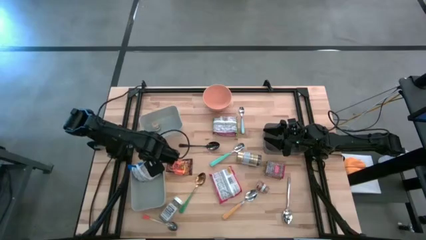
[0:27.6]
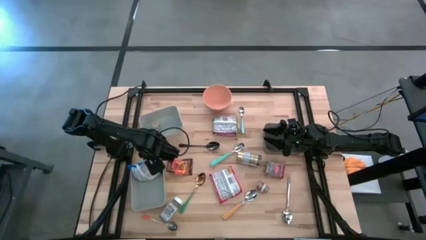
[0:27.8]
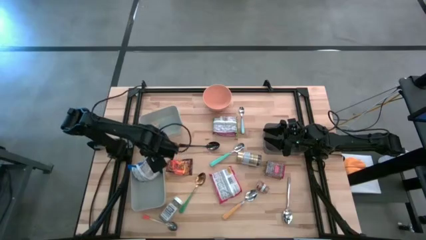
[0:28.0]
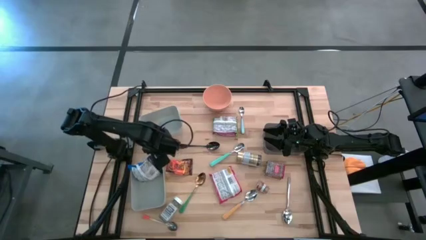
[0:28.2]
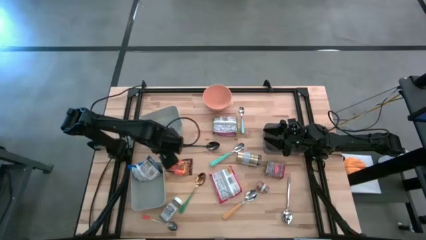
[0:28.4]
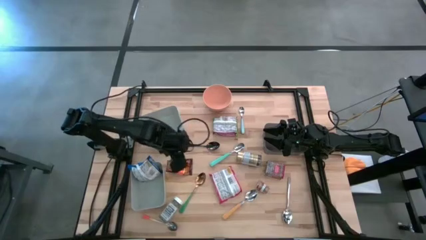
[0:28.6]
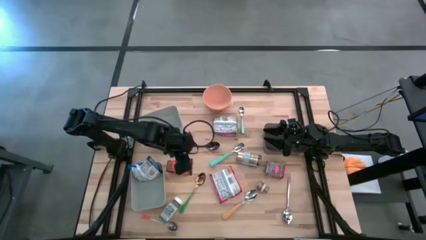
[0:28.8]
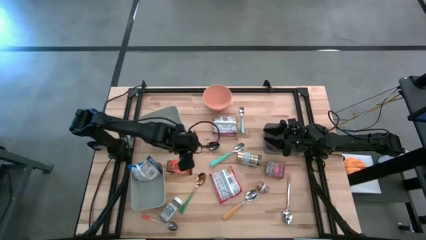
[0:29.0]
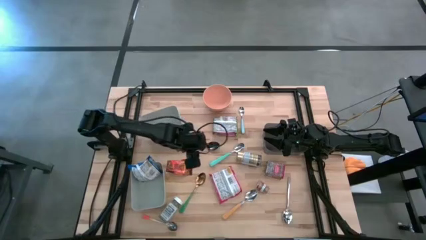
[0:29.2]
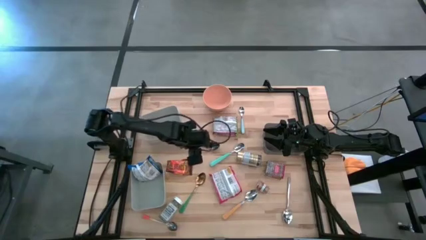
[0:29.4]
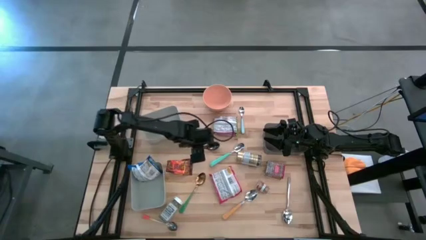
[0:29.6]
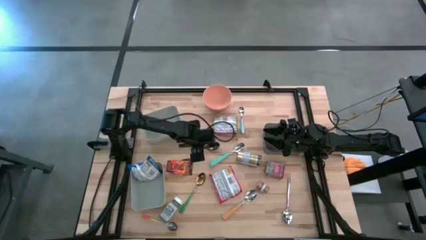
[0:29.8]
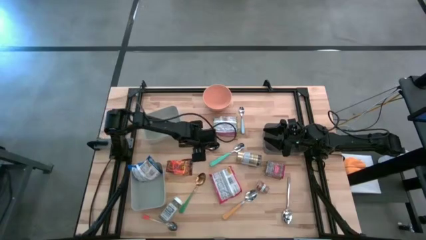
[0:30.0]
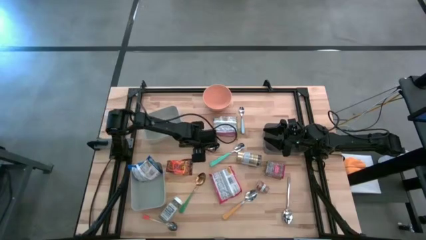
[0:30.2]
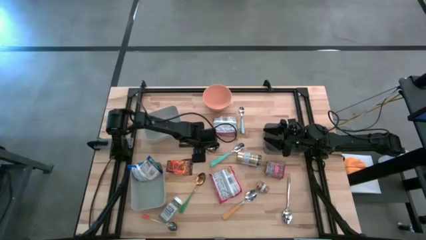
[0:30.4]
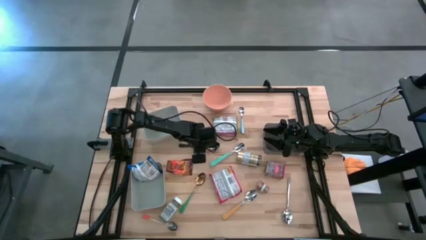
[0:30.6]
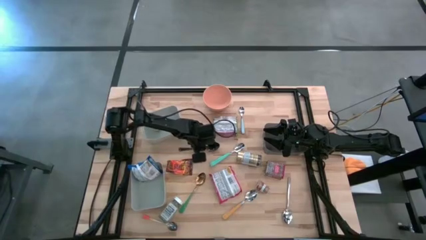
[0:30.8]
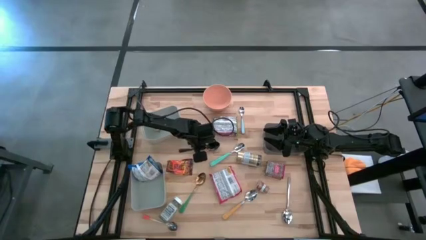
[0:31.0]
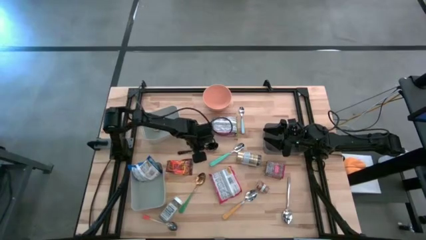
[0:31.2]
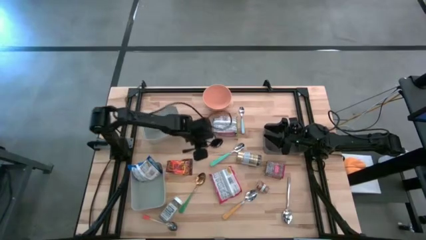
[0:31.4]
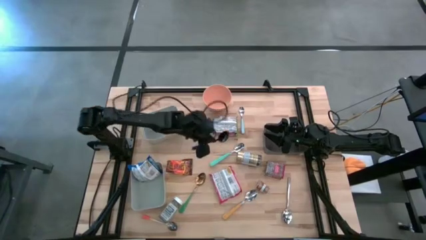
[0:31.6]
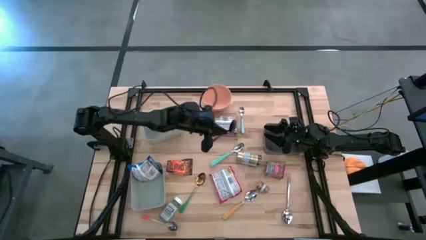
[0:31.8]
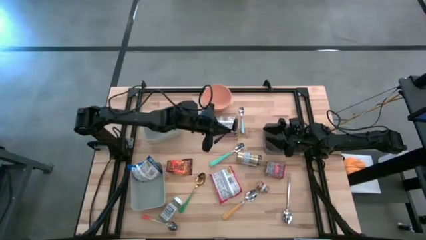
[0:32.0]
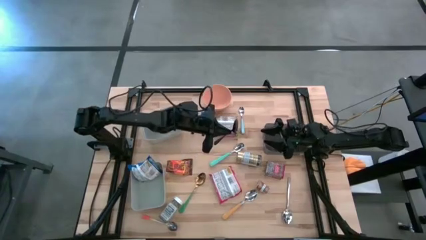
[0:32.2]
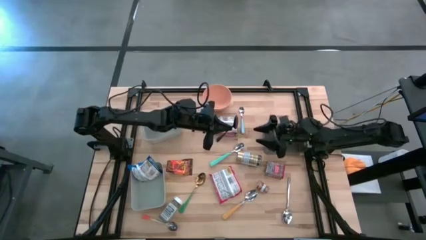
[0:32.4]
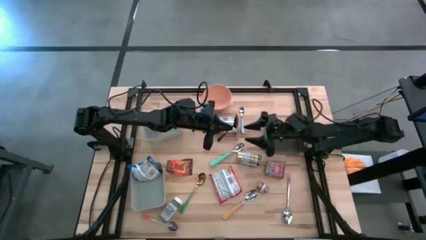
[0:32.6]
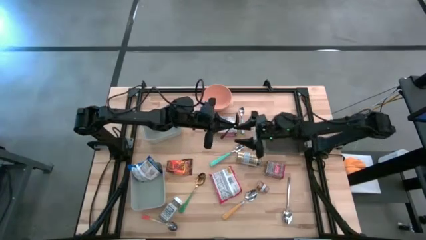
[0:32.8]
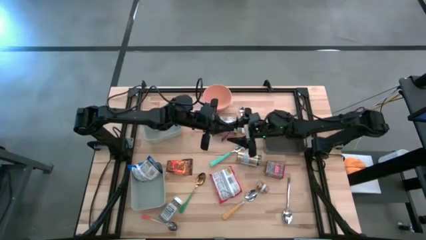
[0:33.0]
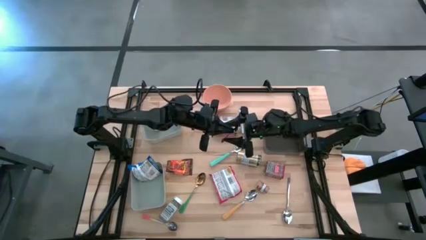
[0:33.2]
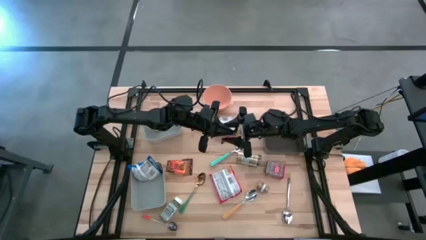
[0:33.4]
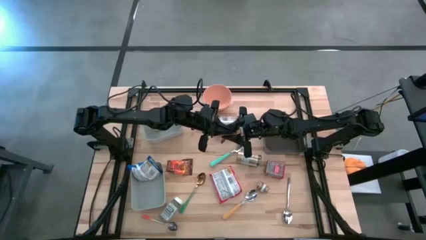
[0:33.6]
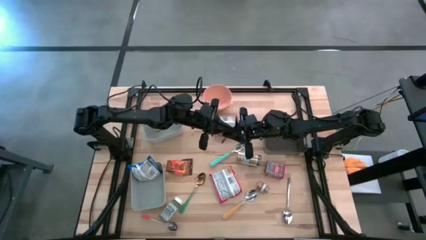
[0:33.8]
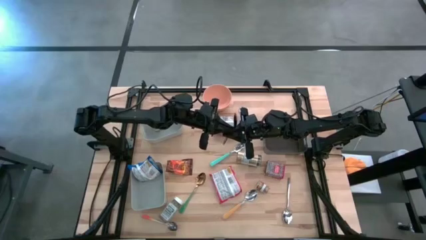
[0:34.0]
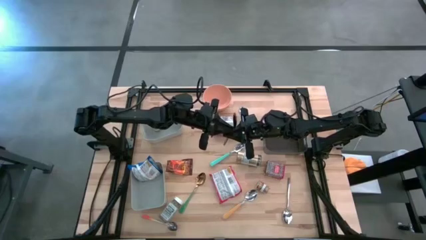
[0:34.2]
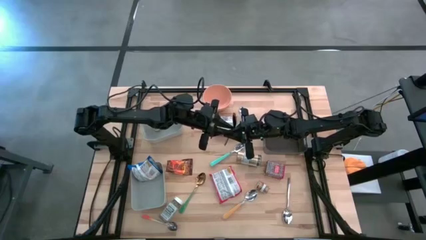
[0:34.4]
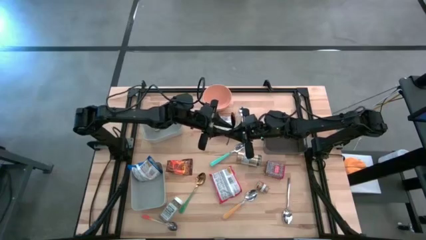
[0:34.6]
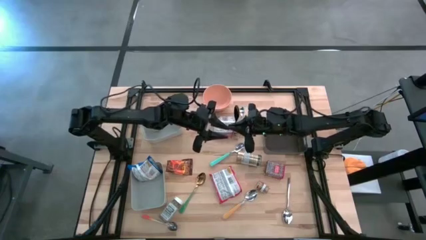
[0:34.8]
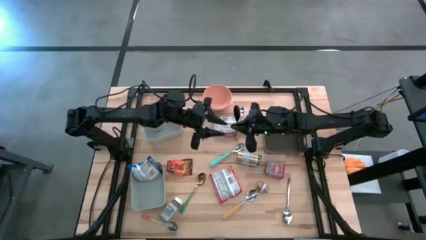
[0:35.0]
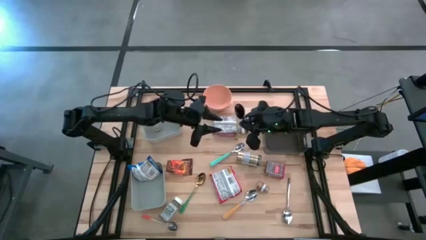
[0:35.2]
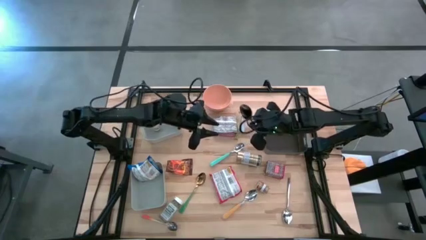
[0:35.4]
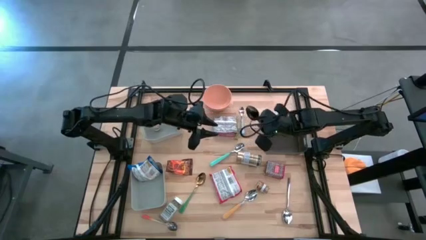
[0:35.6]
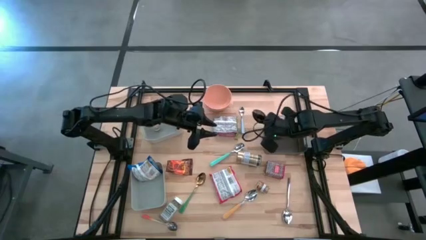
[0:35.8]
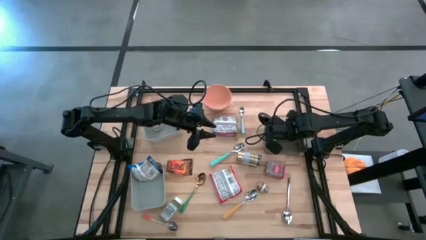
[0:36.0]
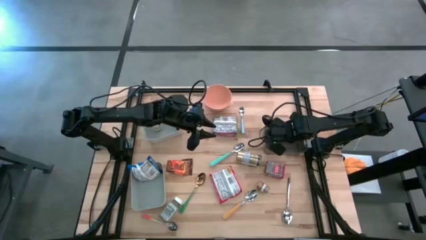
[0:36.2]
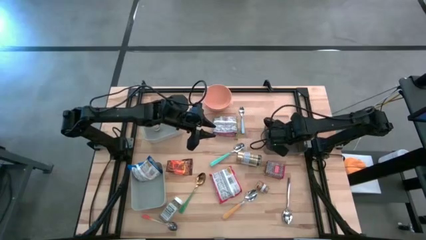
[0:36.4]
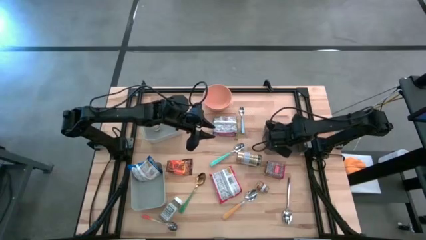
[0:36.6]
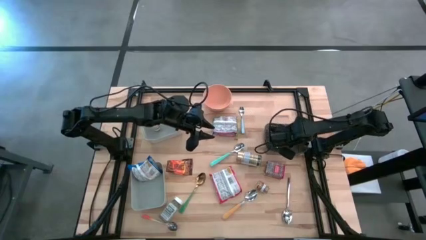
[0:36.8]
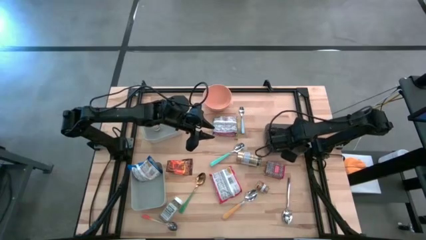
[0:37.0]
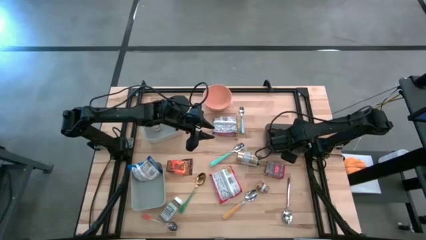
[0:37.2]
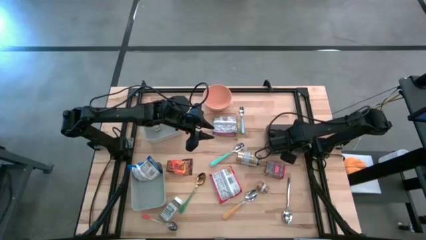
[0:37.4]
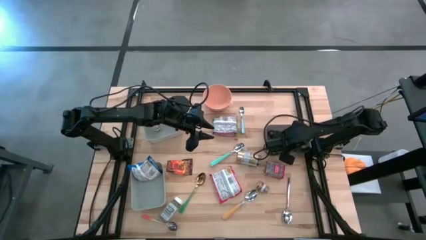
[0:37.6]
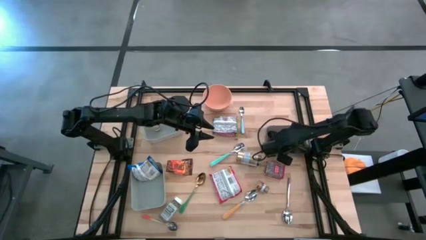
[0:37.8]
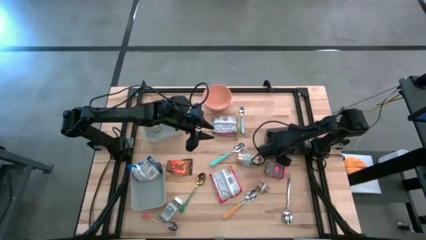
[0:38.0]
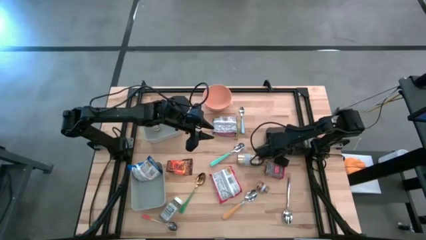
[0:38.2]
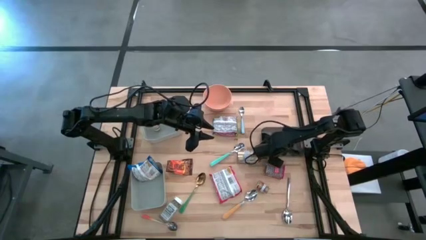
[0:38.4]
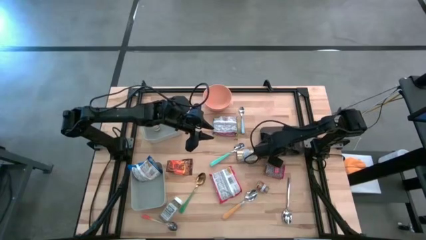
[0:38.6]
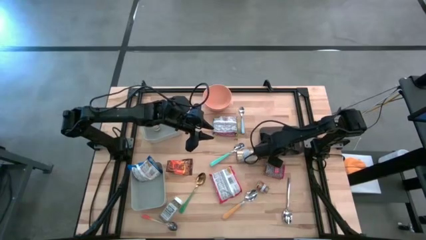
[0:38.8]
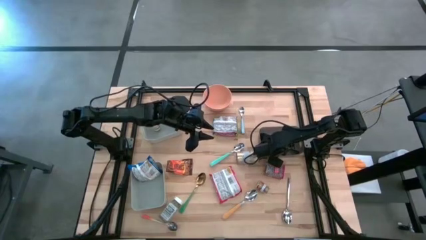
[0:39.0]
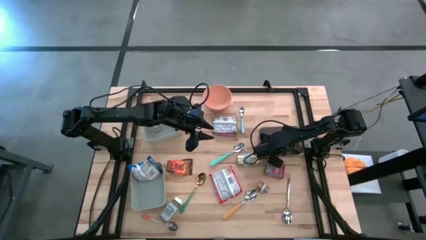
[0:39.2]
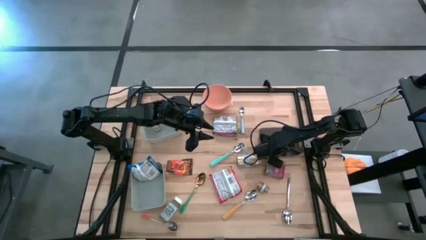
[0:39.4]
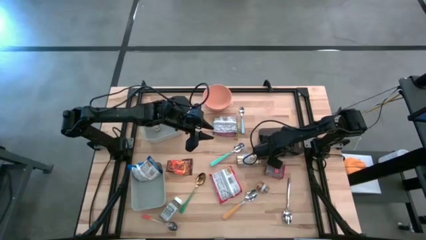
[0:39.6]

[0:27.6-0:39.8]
Put the black spoon into the black bin

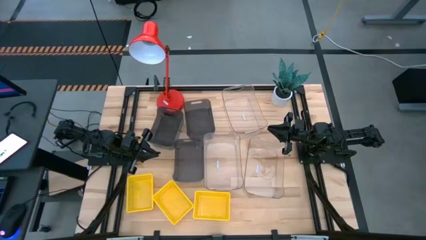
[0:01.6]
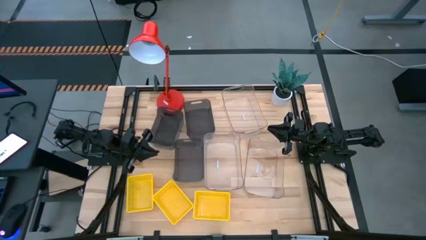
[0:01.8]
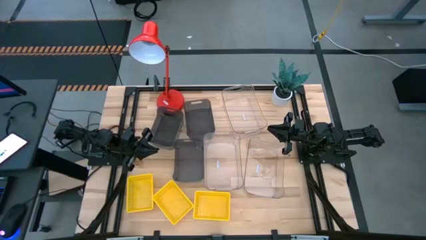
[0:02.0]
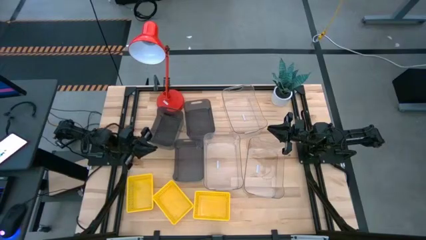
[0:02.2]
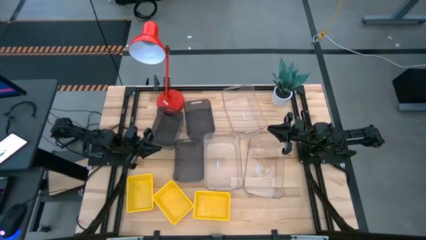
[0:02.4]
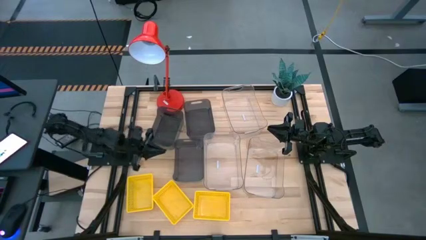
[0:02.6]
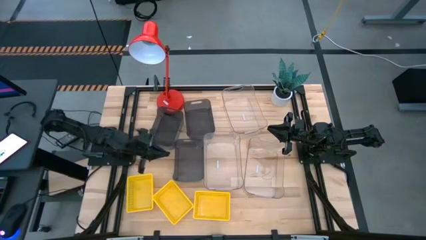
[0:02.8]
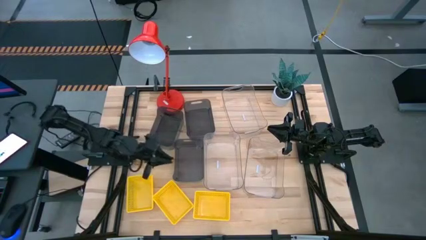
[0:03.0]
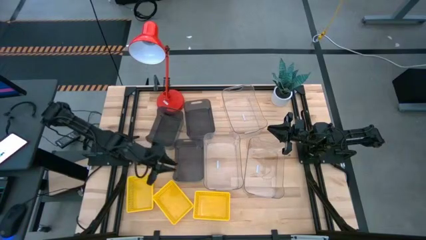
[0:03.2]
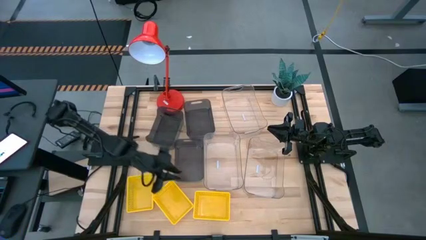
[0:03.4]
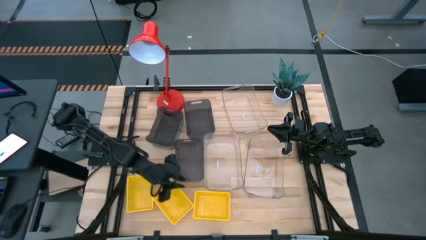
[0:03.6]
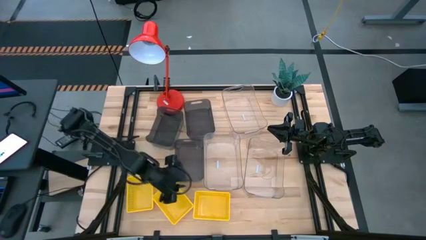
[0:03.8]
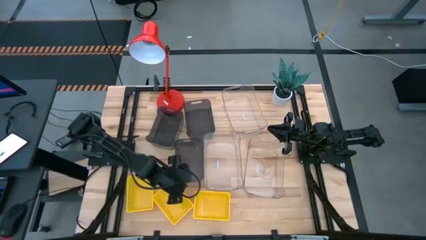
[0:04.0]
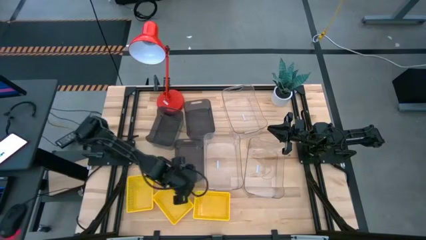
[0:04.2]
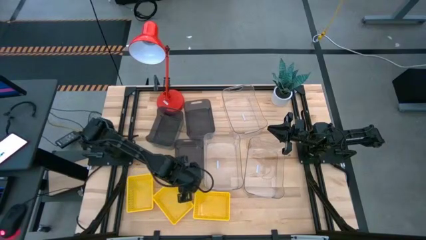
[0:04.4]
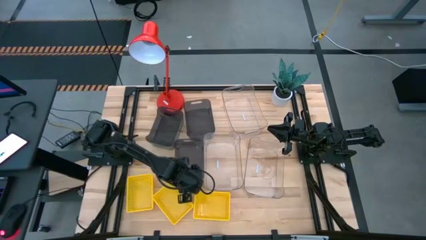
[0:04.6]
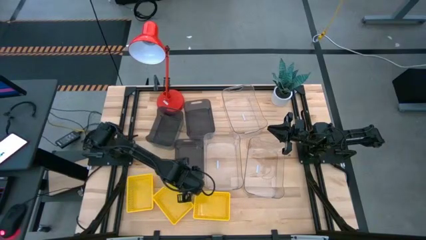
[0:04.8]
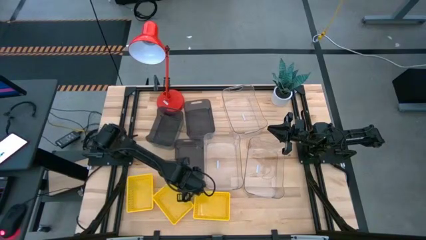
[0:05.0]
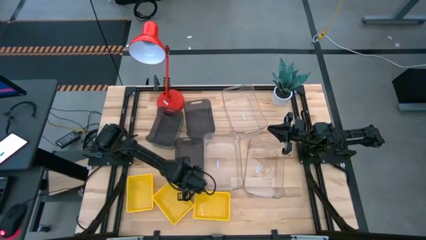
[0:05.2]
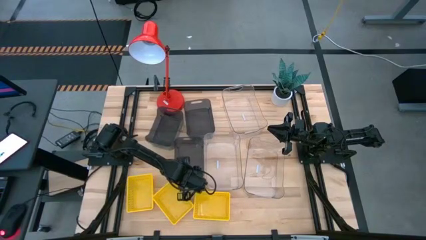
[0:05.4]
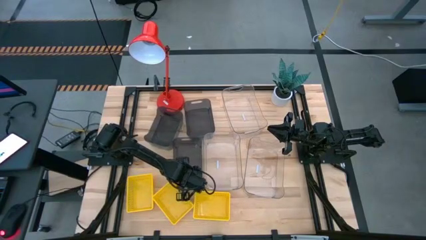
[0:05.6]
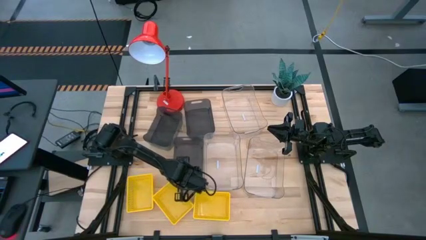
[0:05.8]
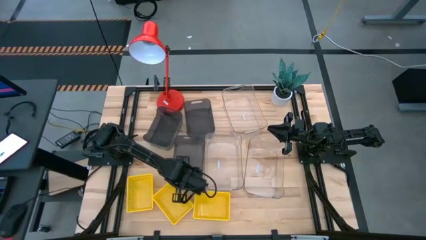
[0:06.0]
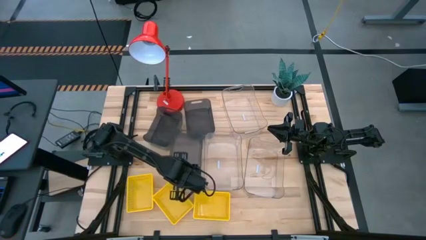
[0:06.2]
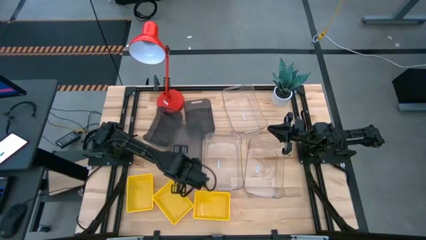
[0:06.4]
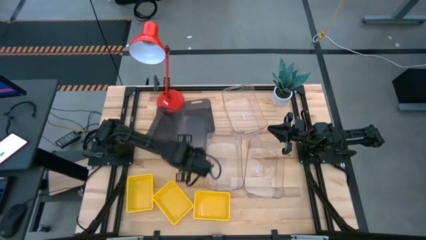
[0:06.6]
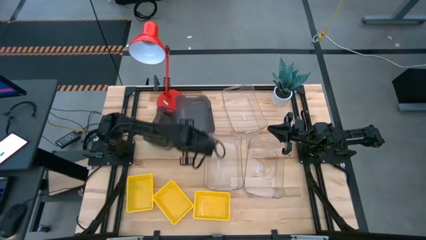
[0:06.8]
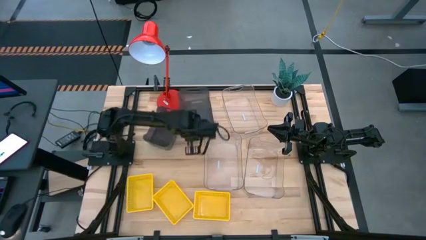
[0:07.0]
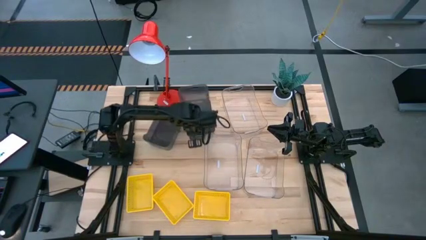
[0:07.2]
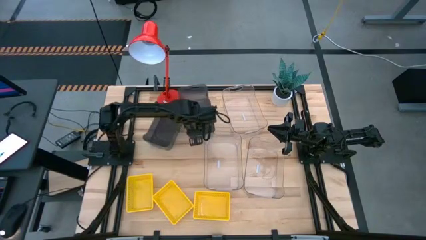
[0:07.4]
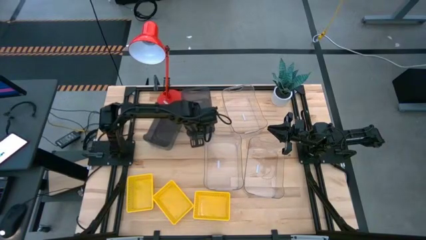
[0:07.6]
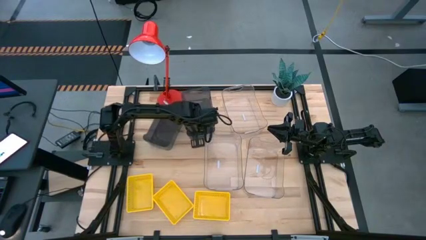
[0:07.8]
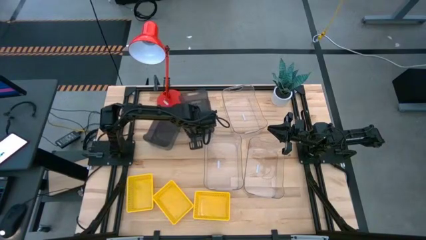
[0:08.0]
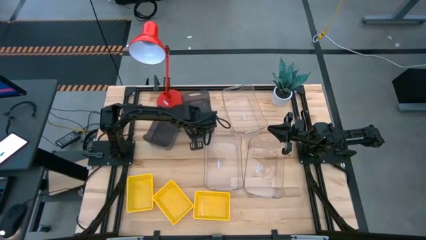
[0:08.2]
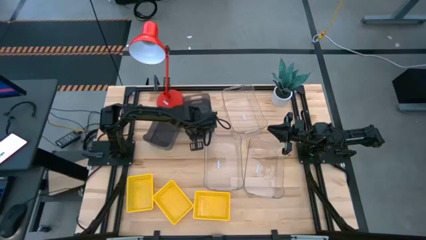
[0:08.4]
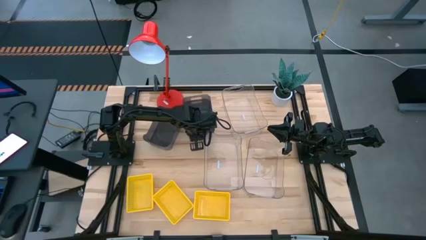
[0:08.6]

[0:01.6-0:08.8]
Stack the bottom black bin on top of the top right black bin
